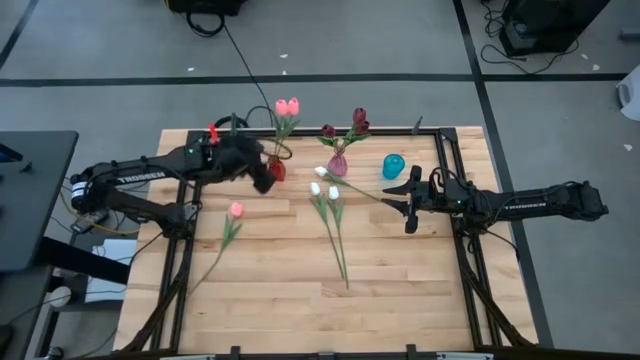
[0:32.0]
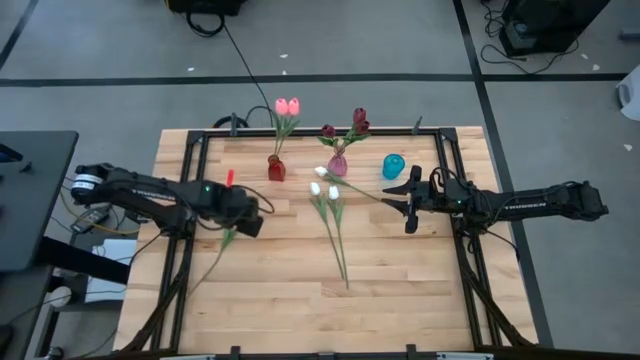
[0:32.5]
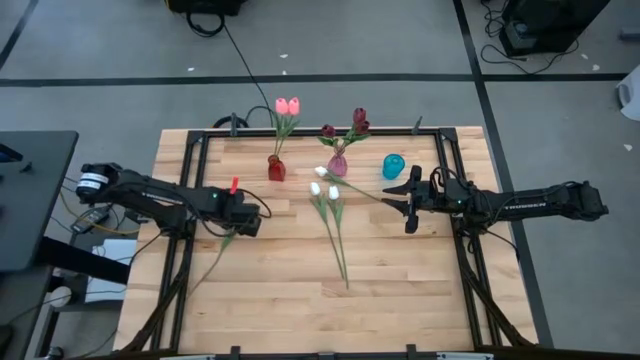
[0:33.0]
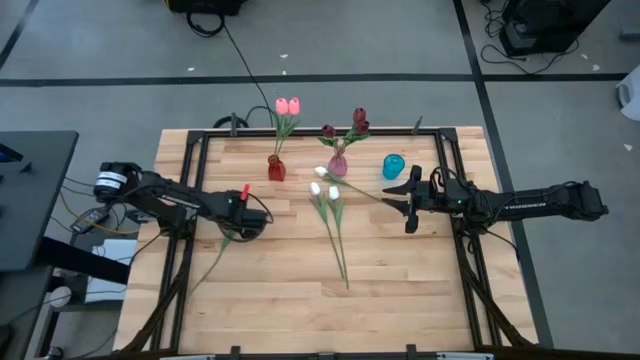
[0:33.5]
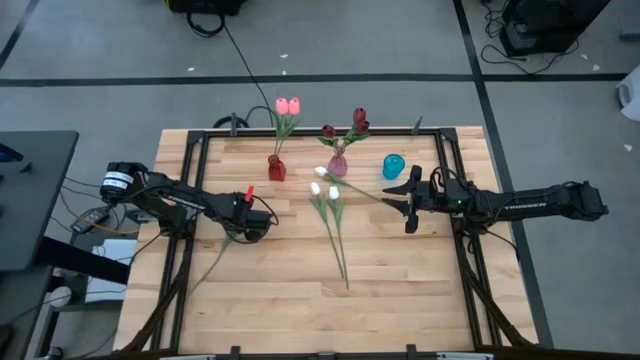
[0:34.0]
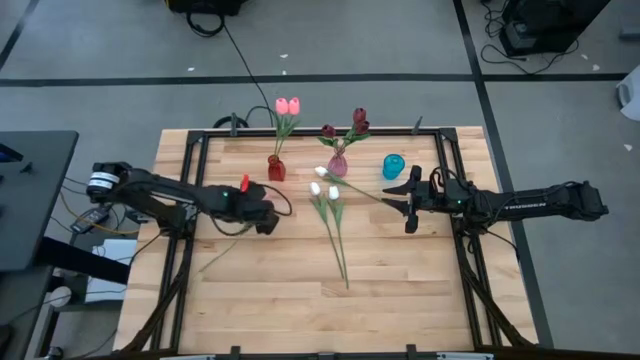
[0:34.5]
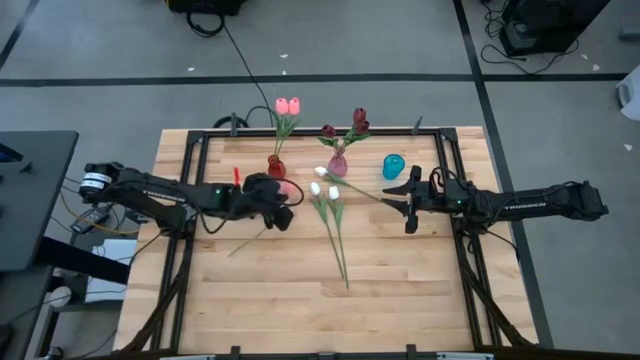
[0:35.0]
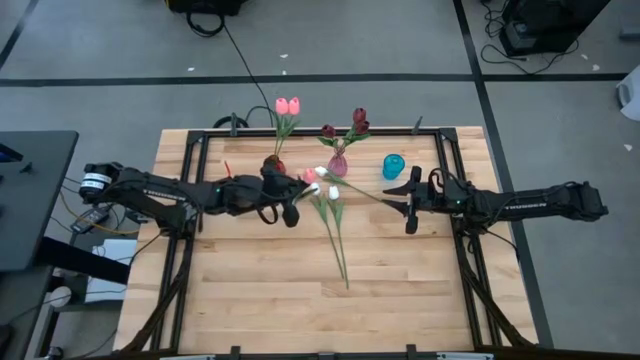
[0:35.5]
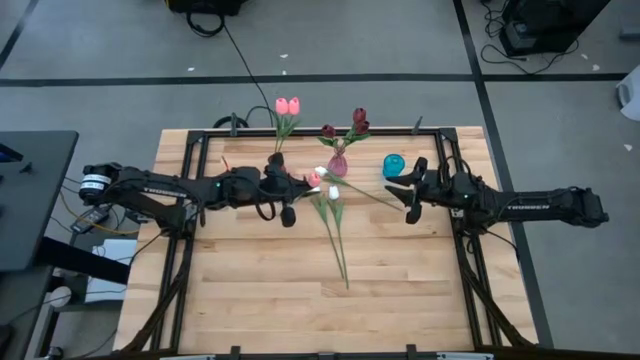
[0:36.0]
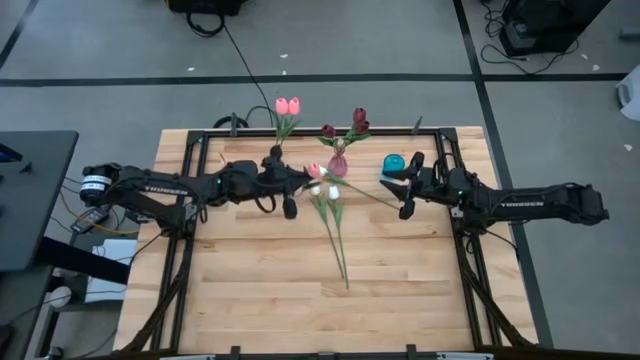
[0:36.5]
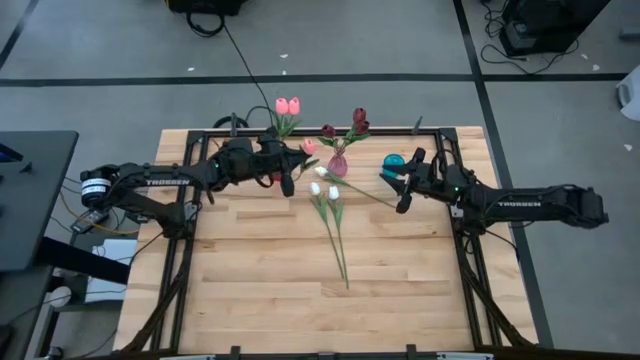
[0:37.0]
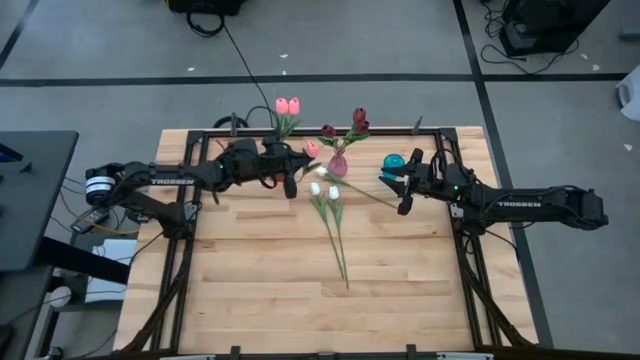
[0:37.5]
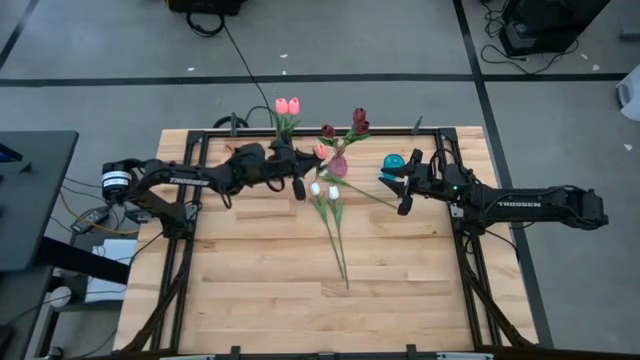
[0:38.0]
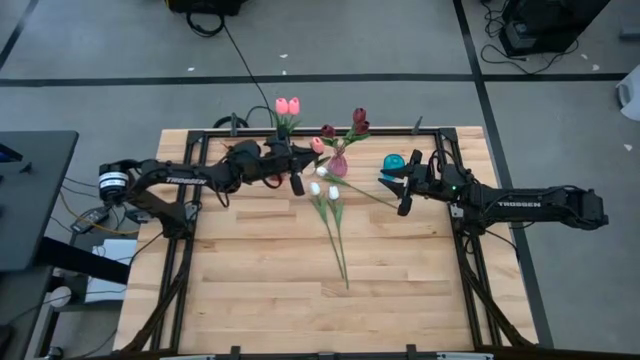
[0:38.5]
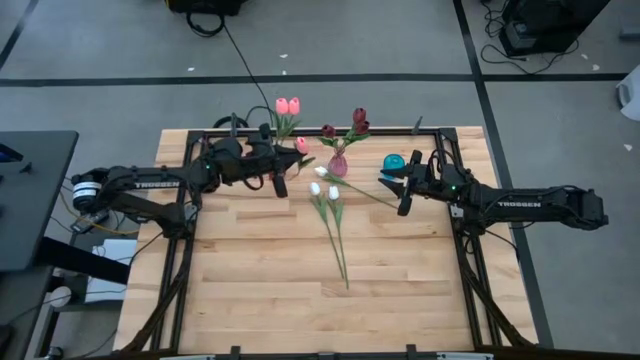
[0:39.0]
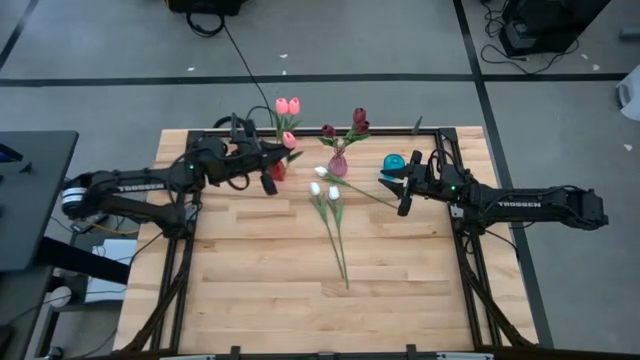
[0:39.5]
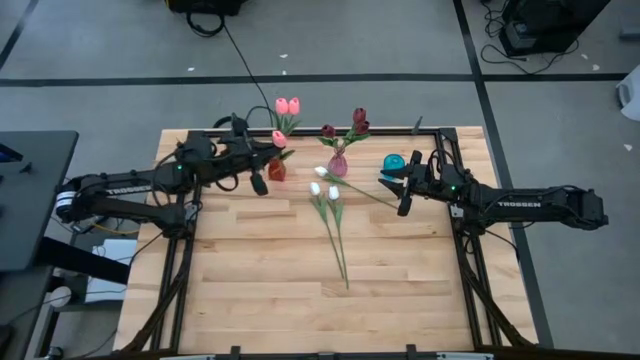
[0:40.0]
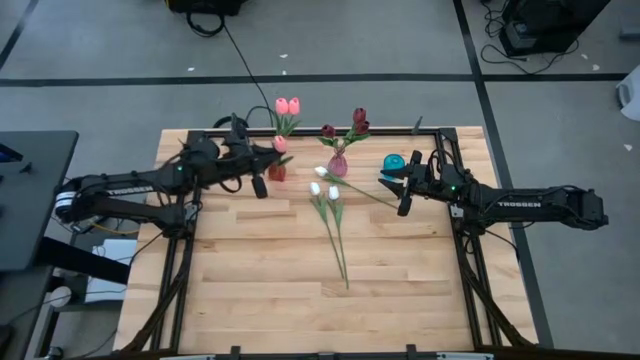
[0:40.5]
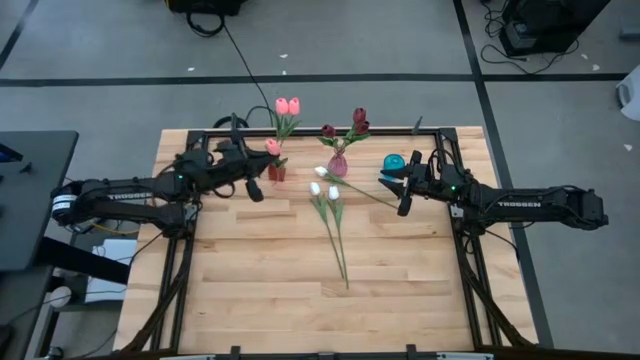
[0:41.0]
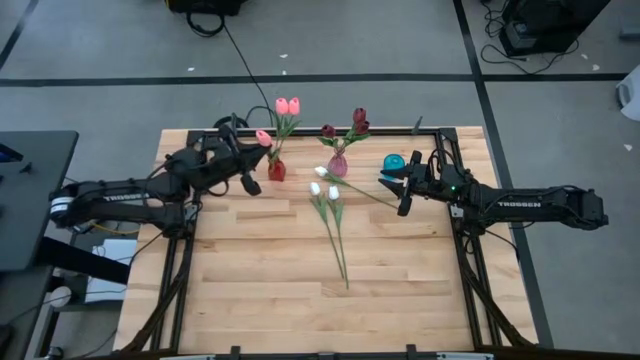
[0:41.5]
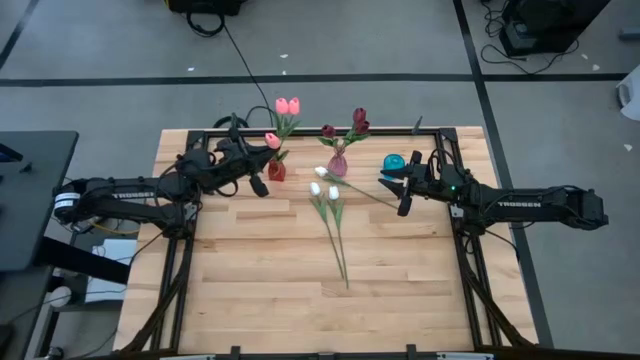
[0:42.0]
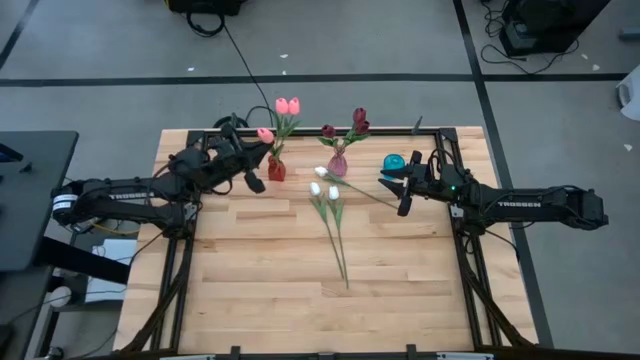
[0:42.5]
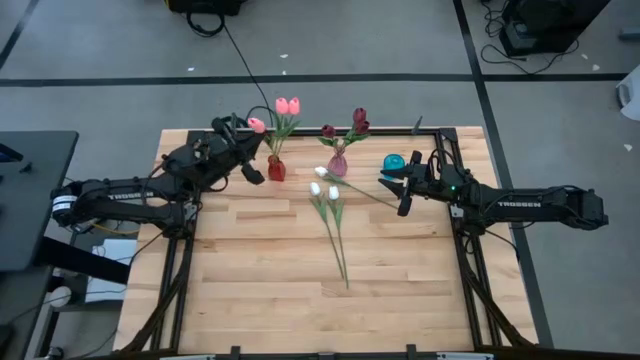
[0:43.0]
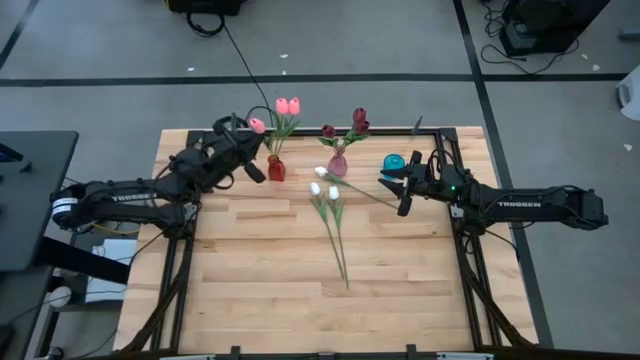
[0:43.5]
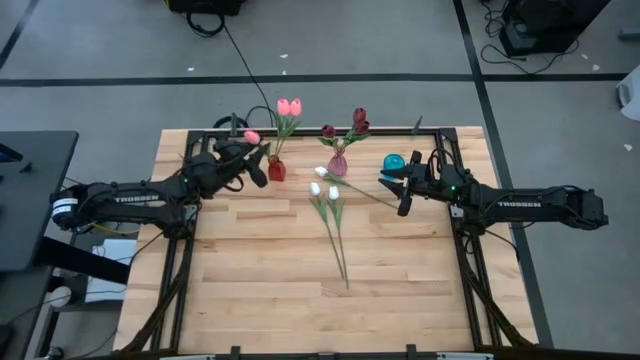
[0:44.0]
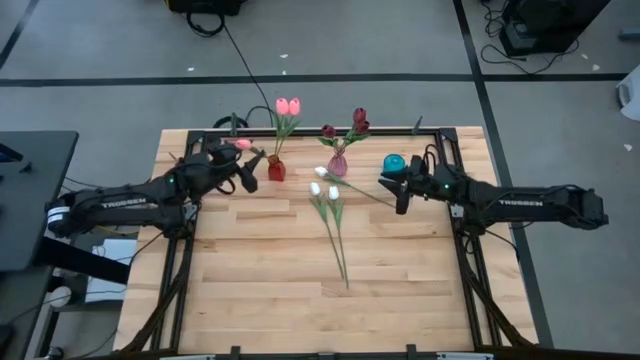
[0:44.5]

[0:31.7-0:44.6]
Task: Sort flowers into vase by color
Put the pink flower into the dark red vase

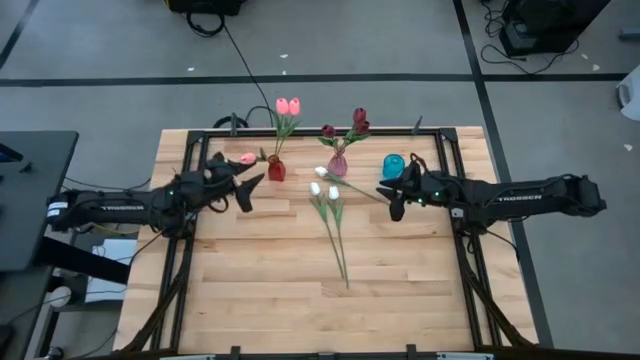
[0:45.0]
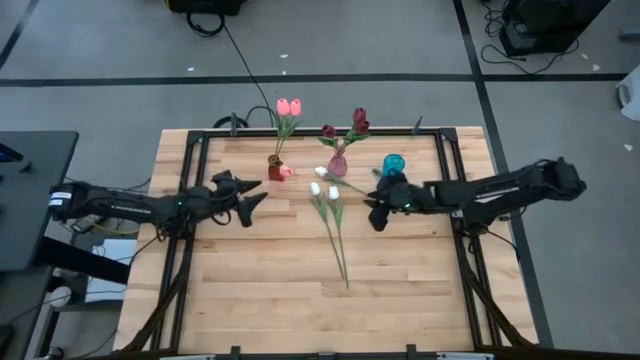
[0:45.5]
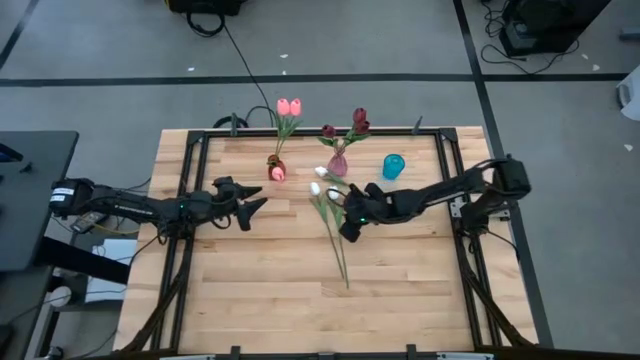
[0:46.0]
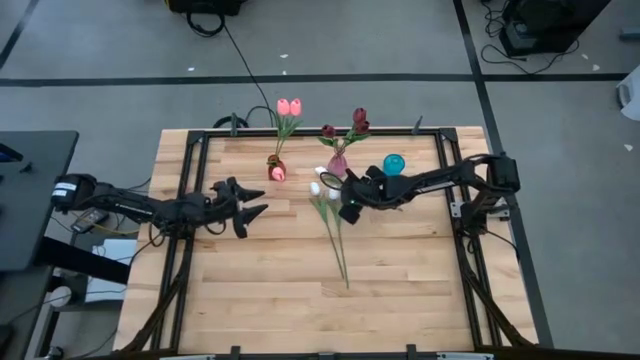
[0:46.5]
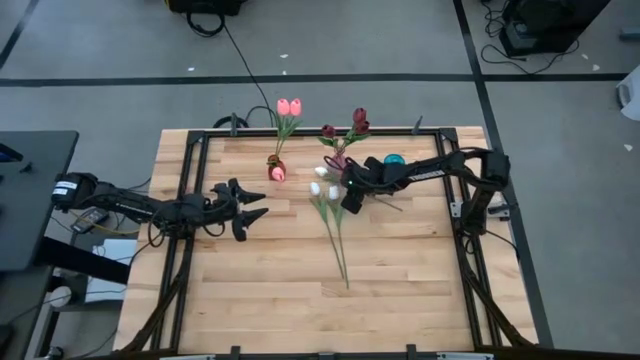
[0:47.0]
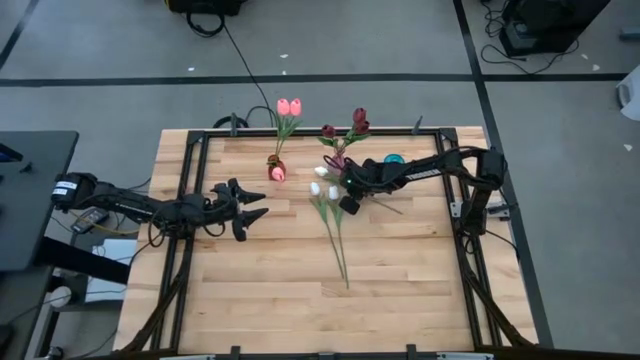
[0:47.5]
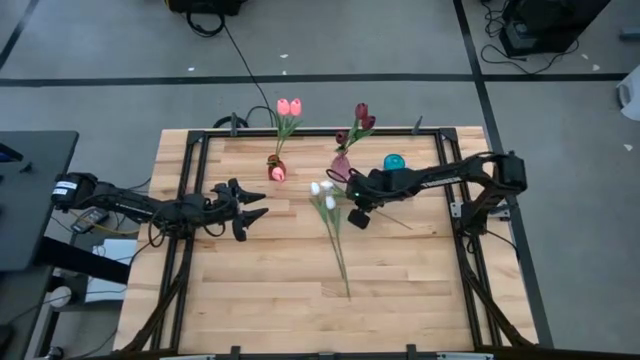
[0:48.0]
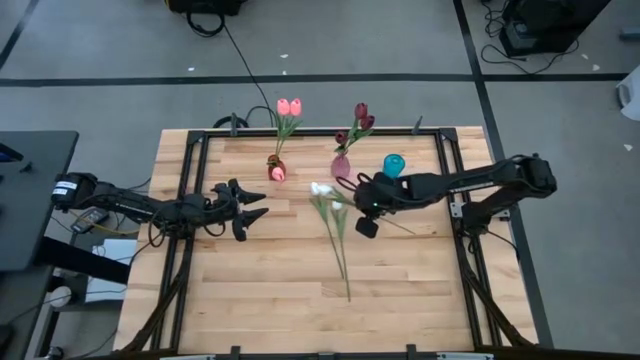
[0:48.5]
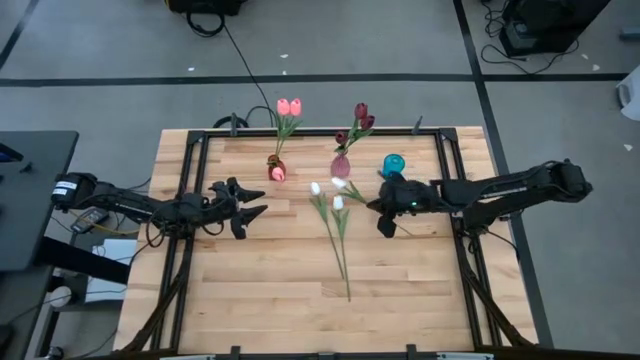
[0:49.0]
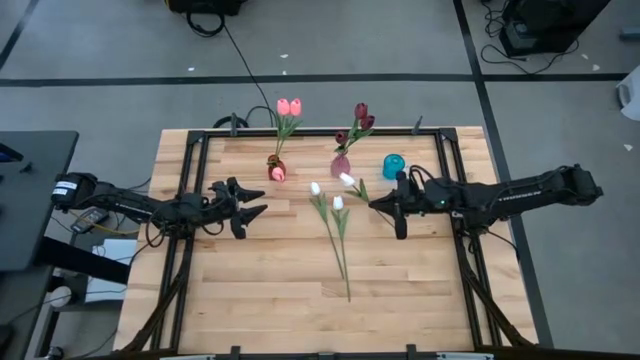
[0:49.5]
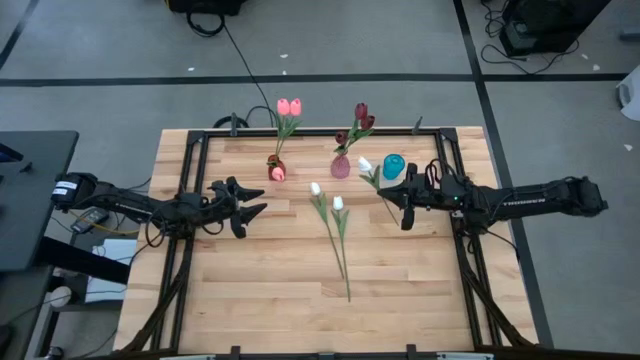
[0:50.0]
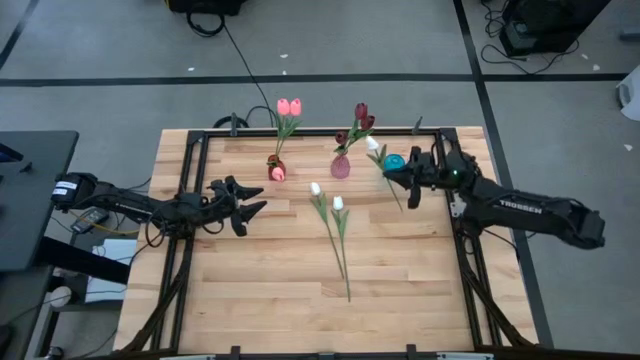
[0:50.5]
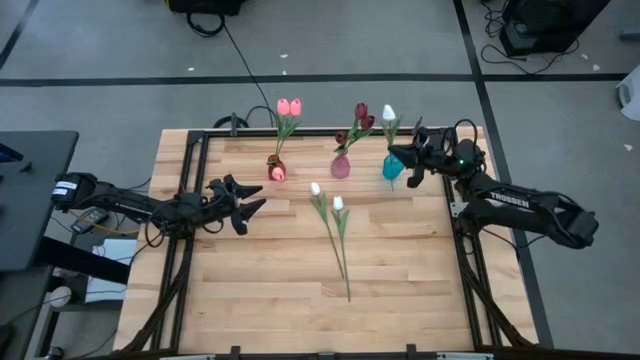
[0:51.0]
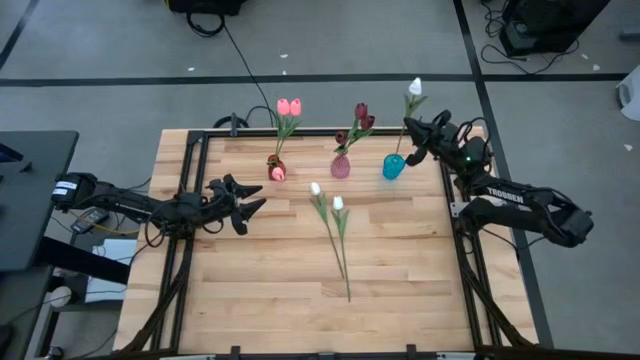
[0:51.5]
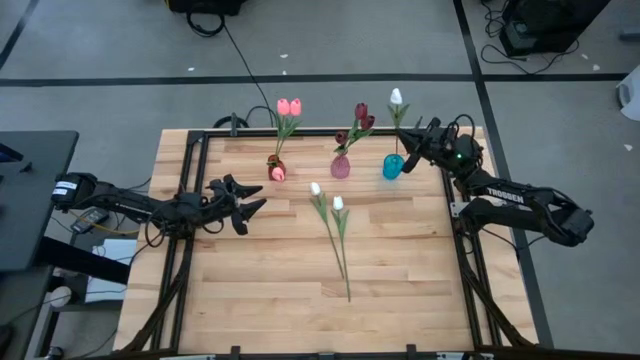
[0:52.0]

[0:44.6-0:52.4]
Put the top white flower into the blue vase
